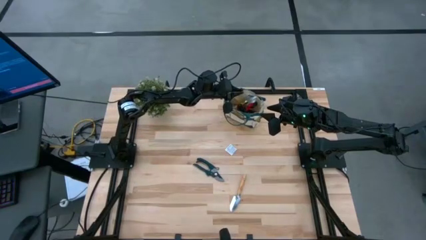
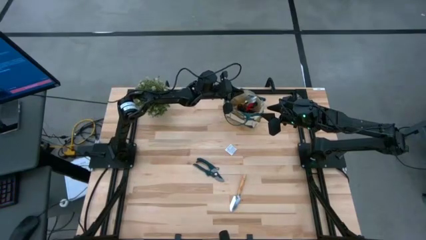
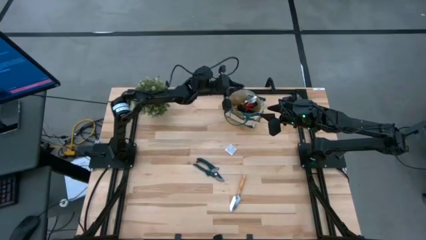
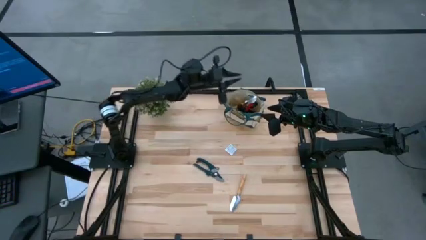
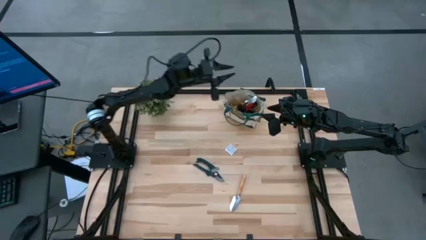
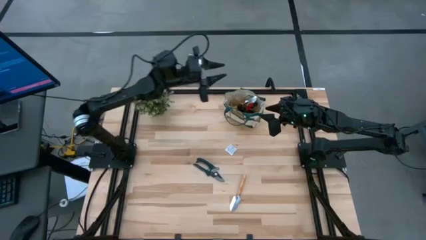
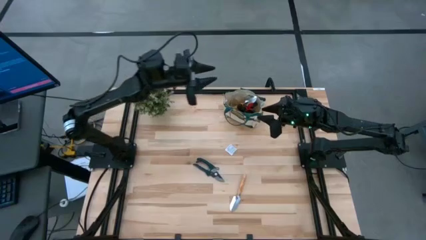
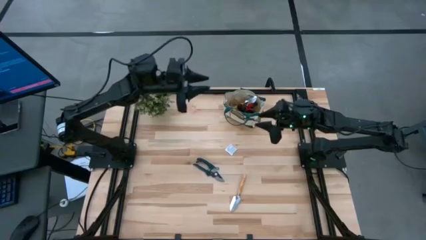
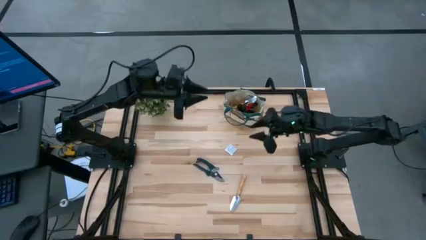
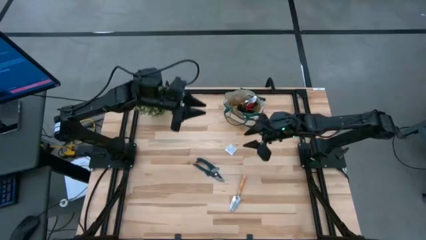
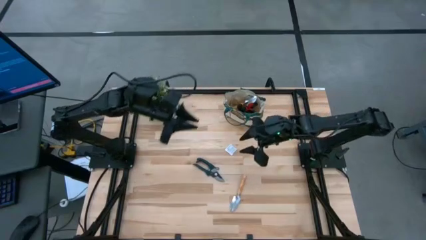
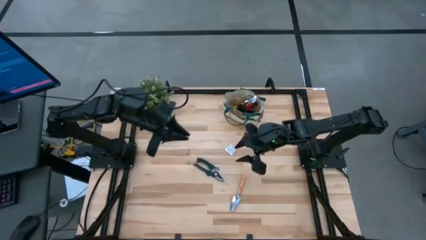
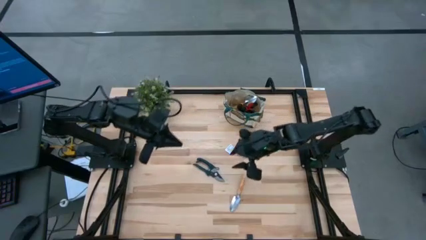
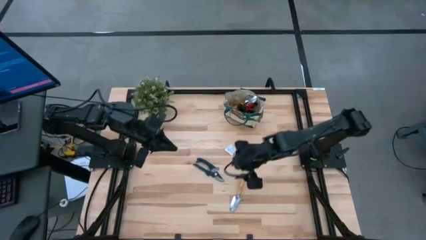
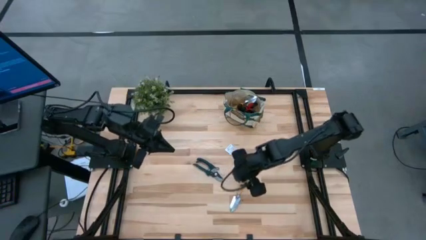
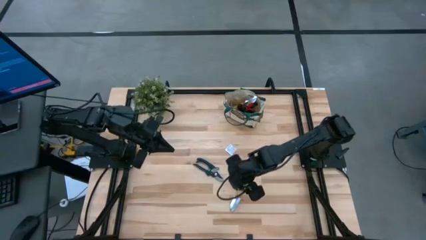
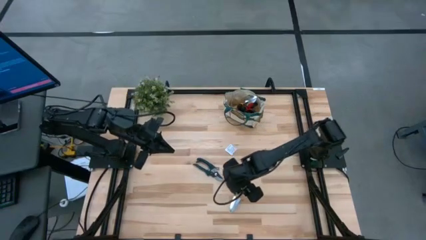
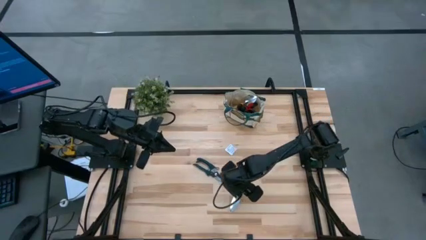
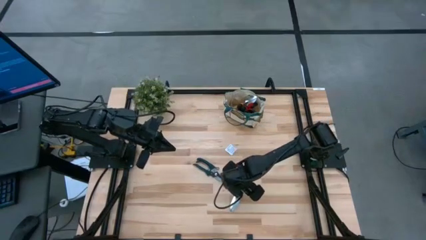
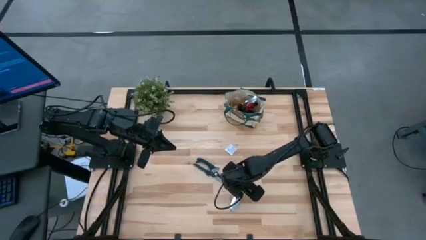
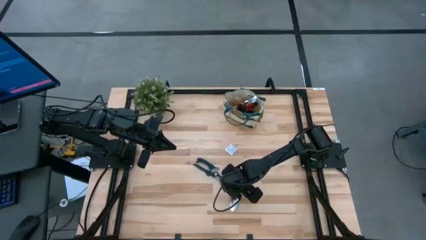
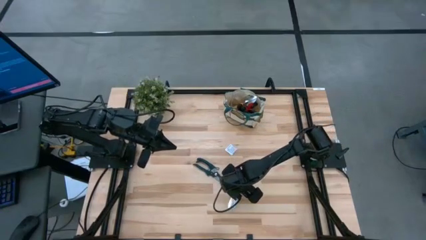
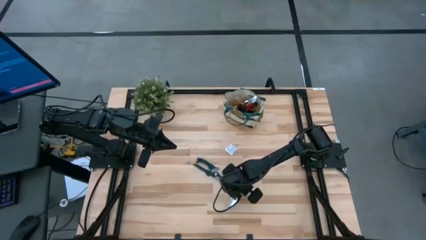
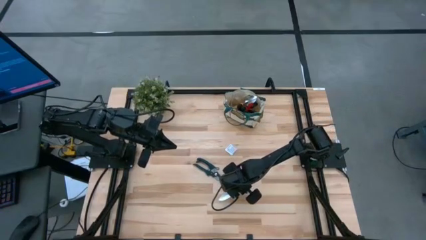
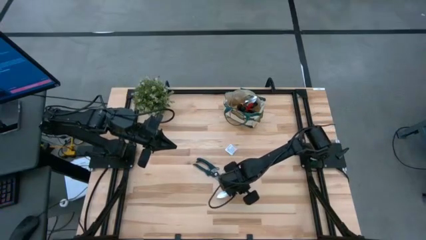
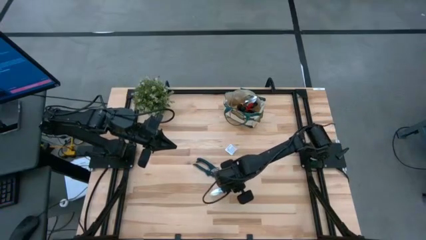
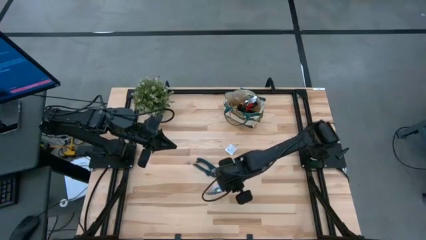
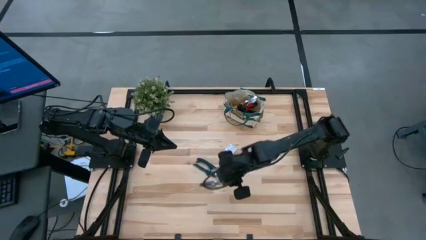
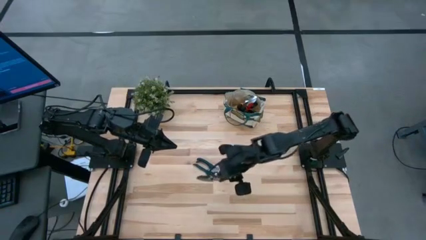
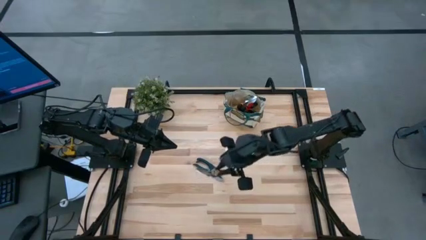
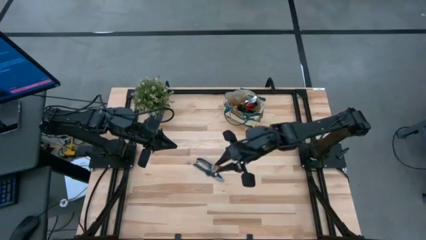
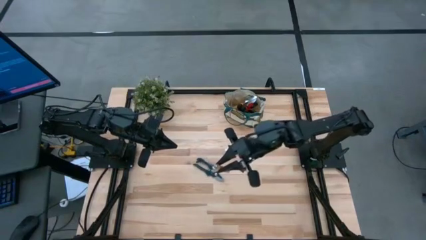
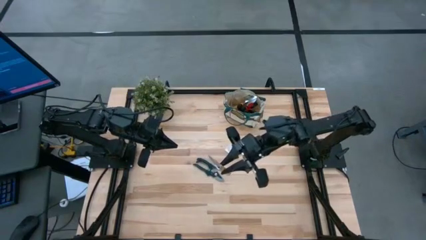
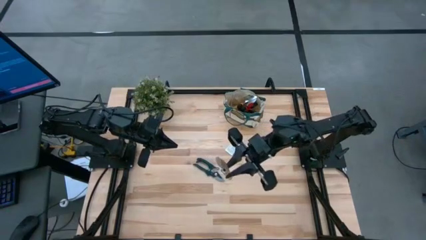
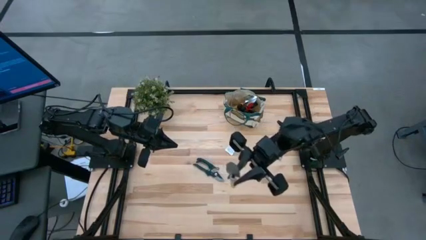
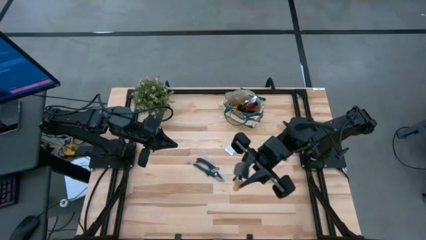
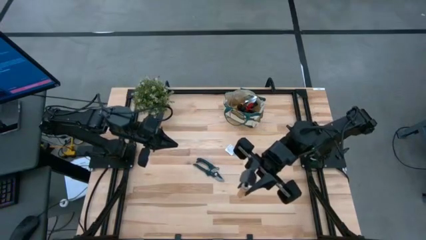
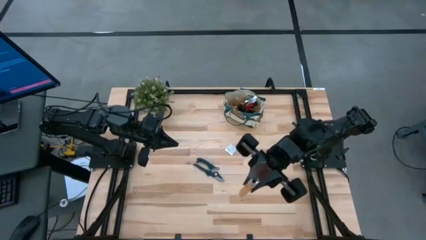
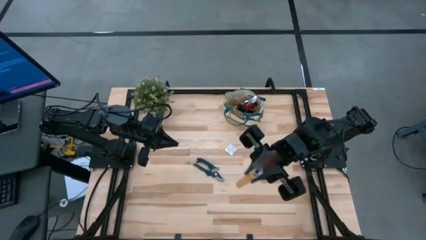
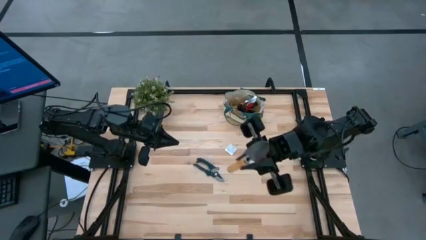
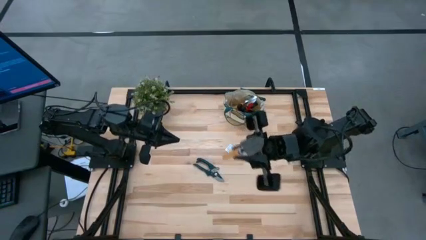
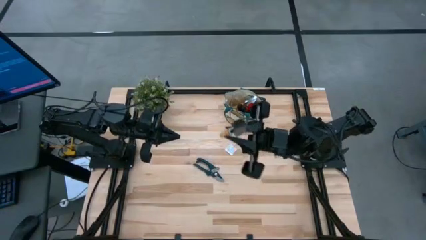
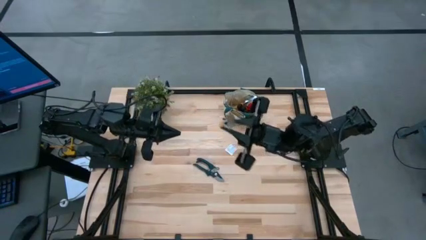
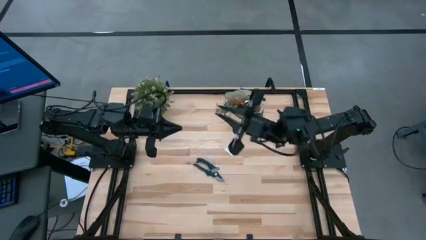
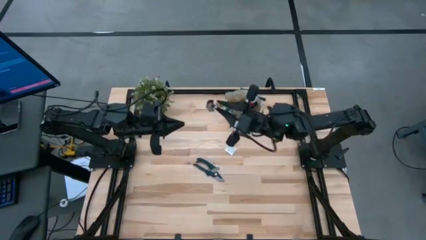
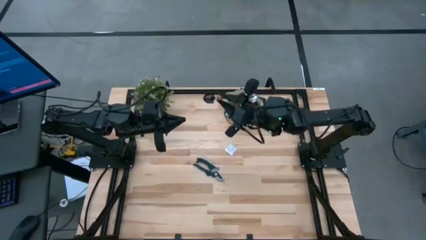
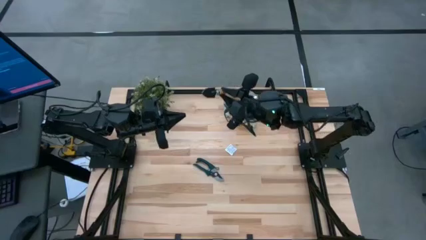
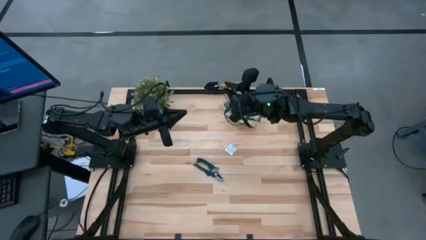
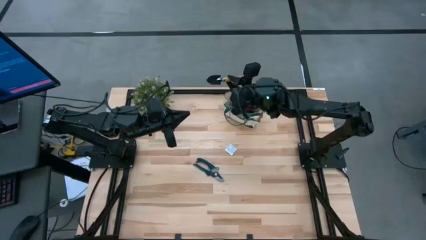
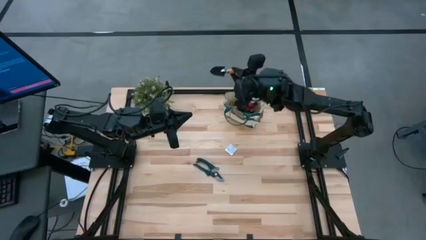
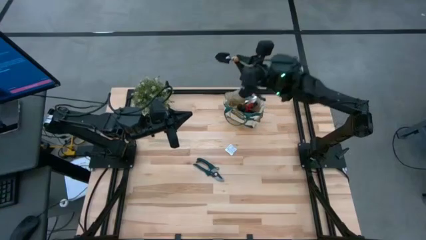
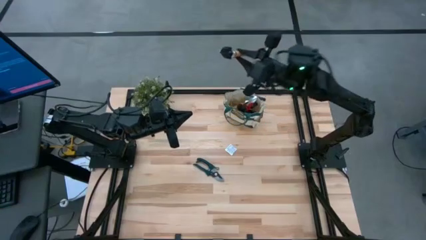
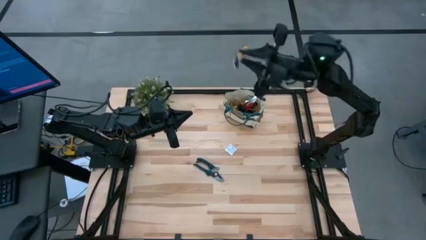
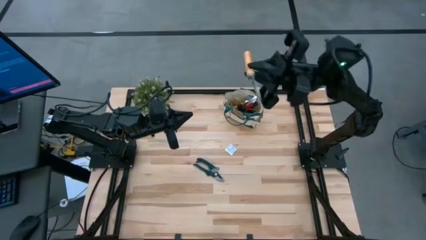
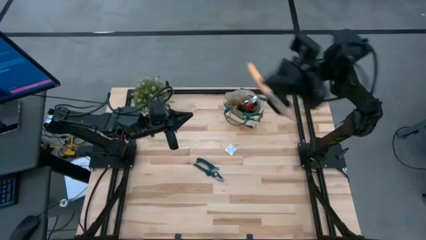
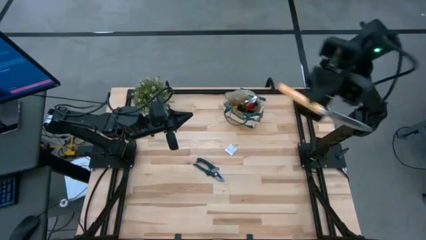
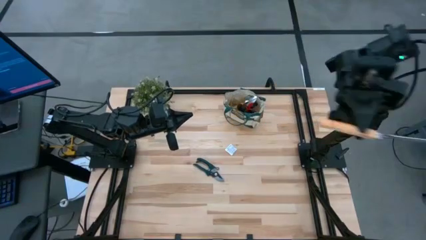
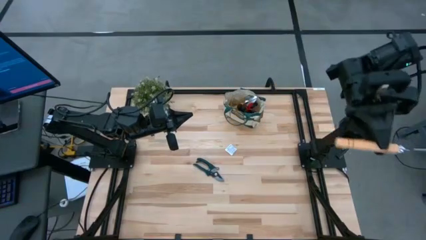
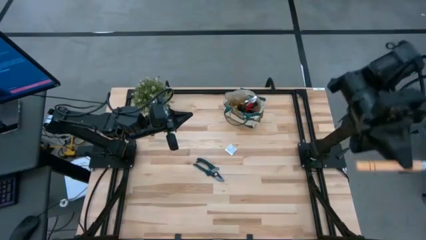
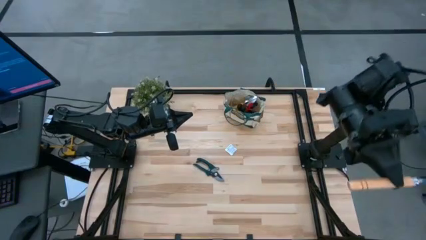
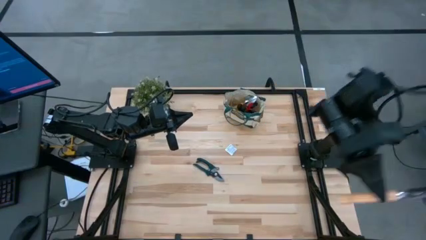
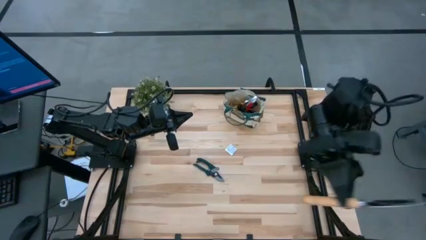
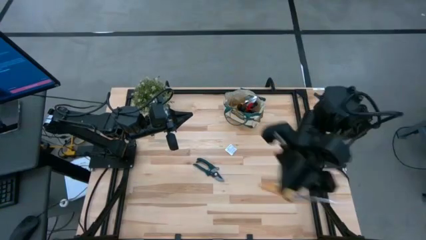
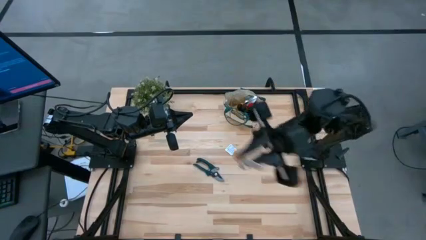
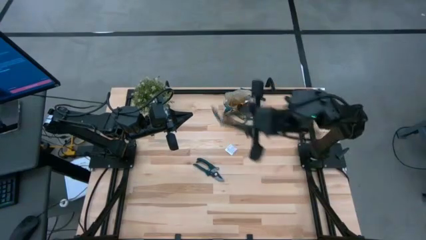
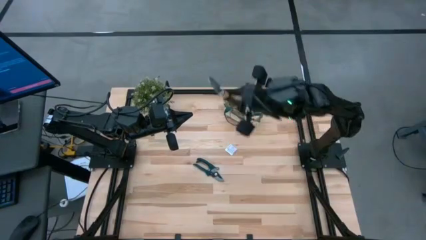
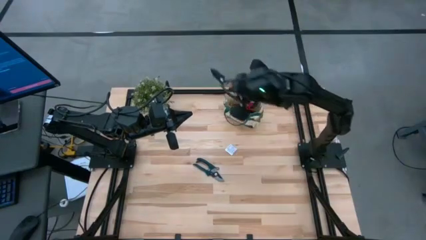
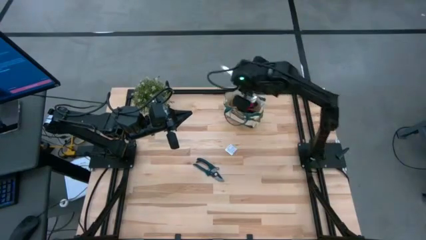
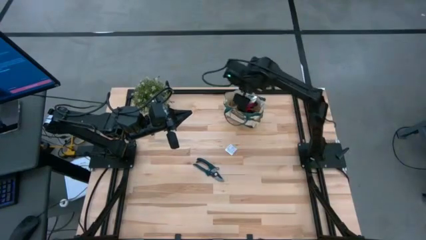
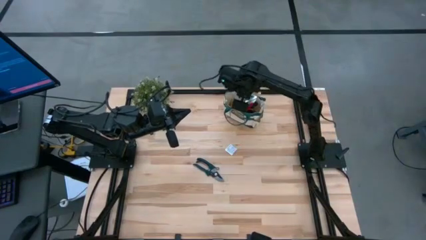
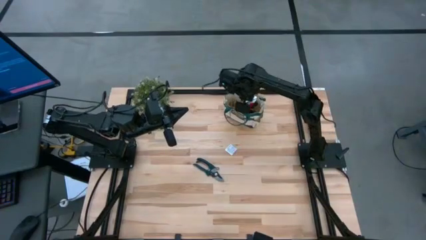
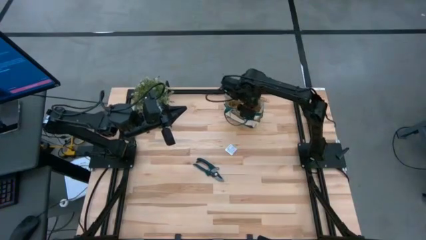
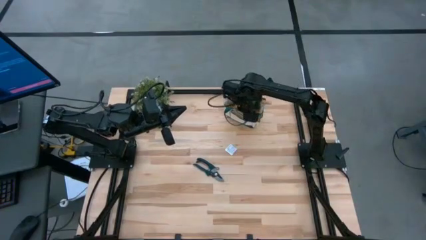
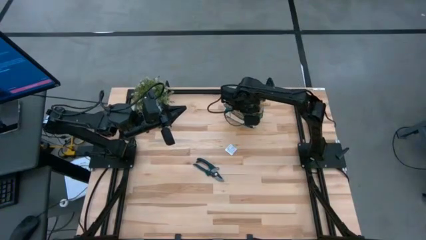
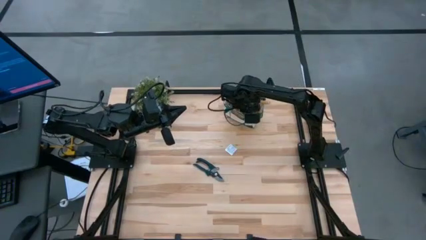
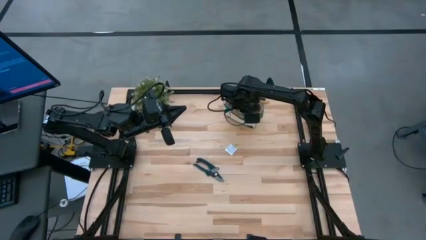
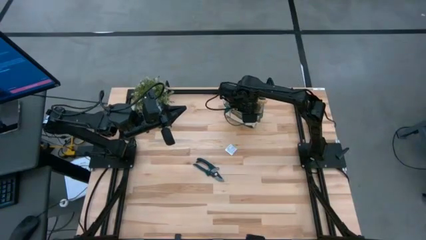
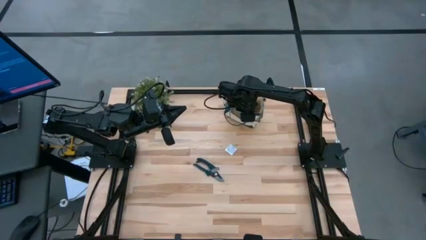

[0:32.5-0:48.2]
Task: Pick & Place Garden tools in Gardening bag
Put the brown trowel into the gardening bag
